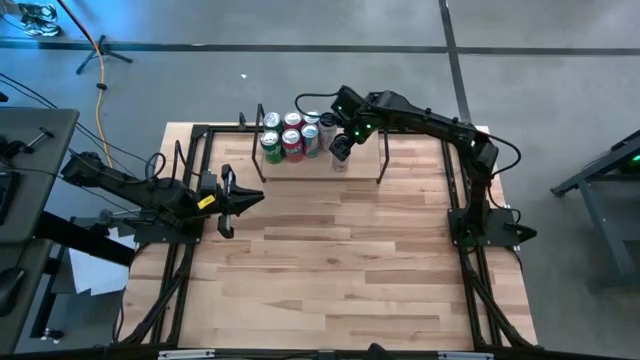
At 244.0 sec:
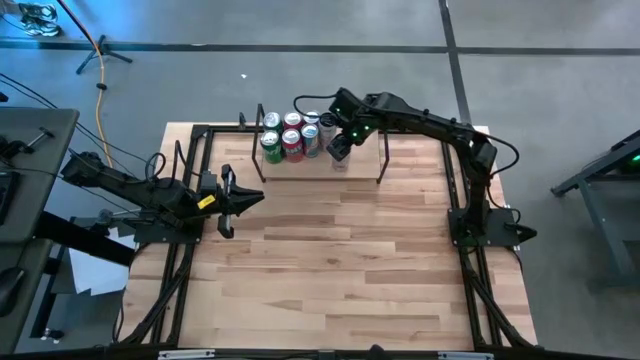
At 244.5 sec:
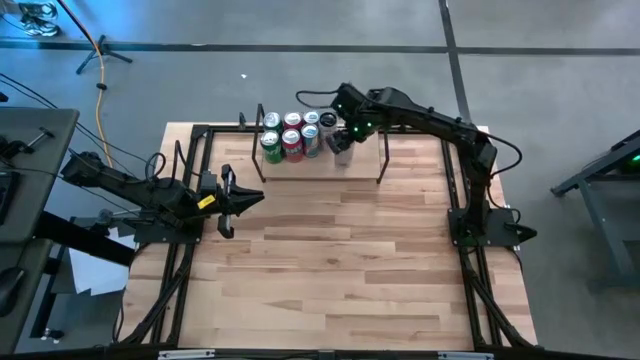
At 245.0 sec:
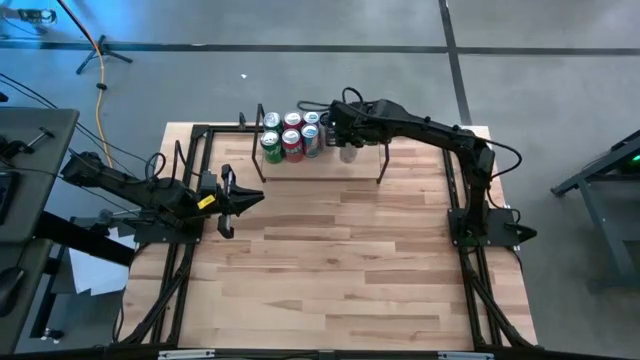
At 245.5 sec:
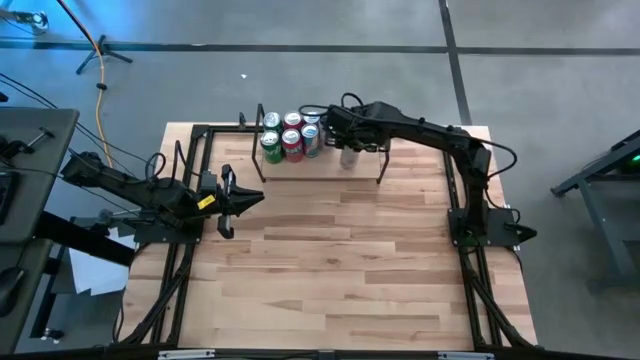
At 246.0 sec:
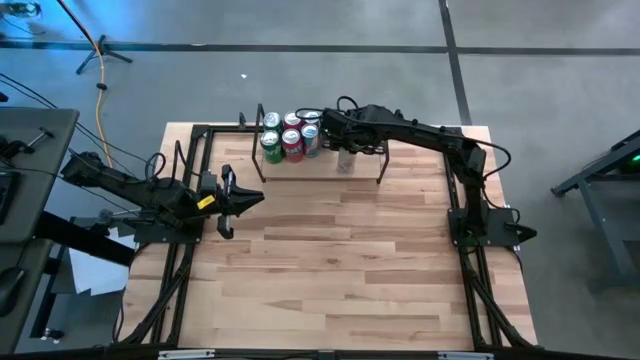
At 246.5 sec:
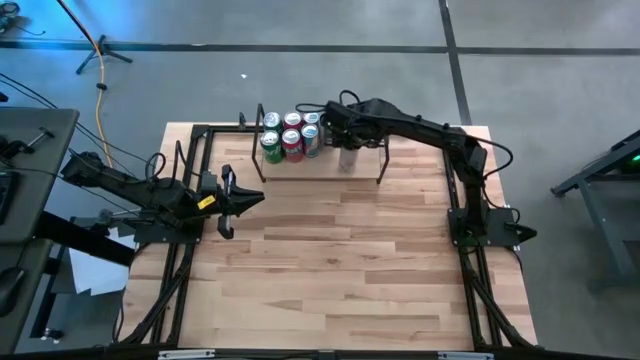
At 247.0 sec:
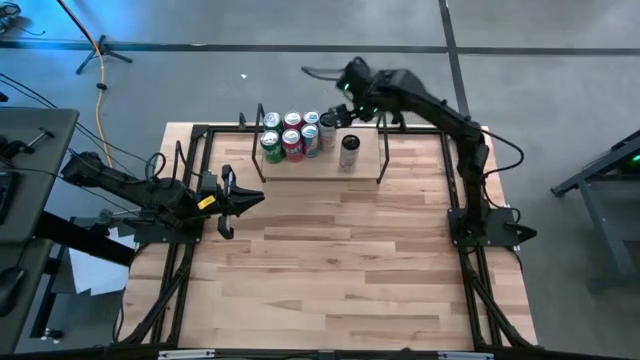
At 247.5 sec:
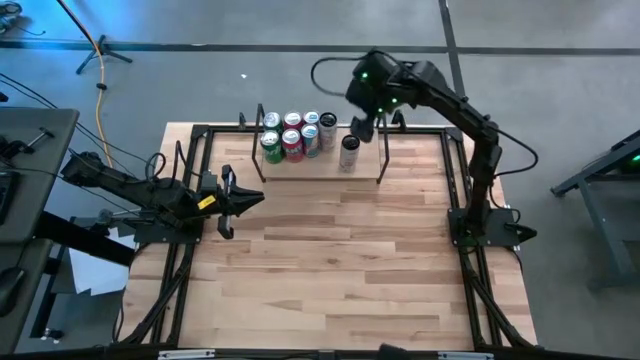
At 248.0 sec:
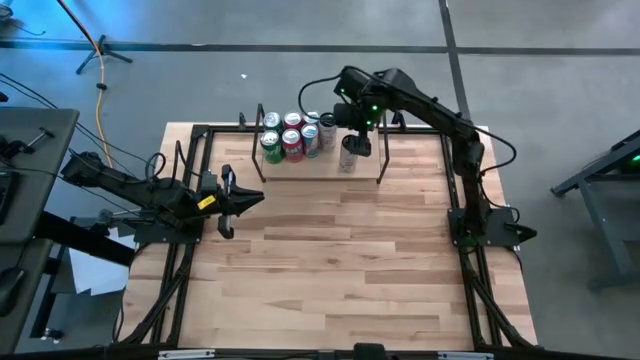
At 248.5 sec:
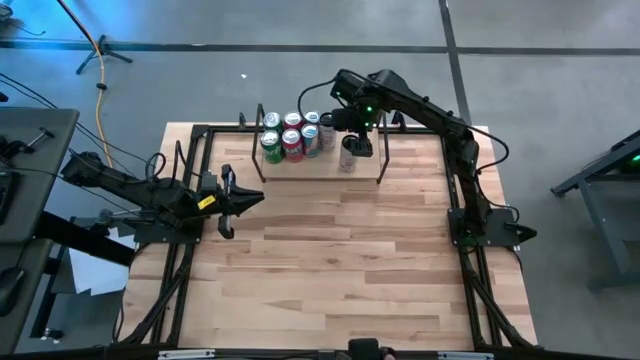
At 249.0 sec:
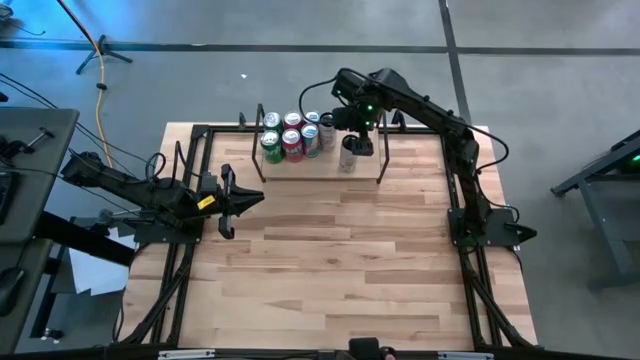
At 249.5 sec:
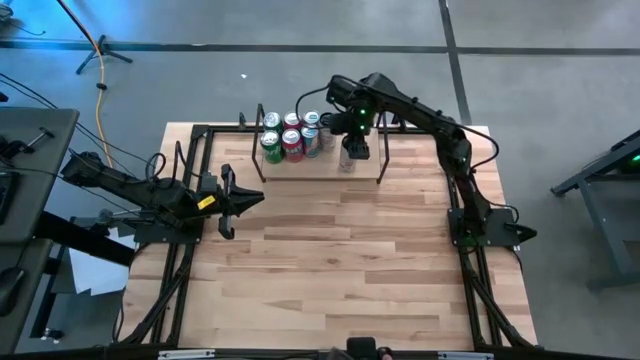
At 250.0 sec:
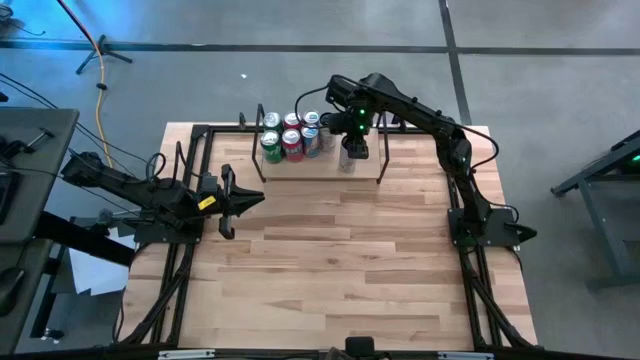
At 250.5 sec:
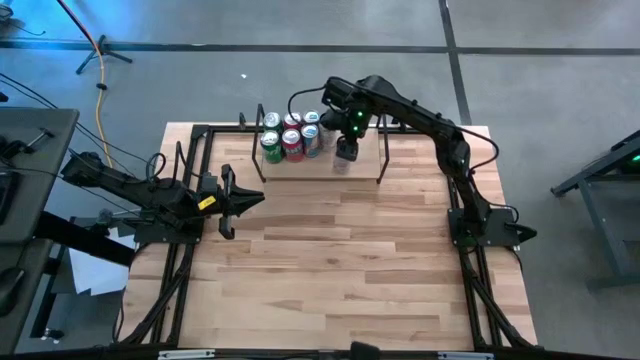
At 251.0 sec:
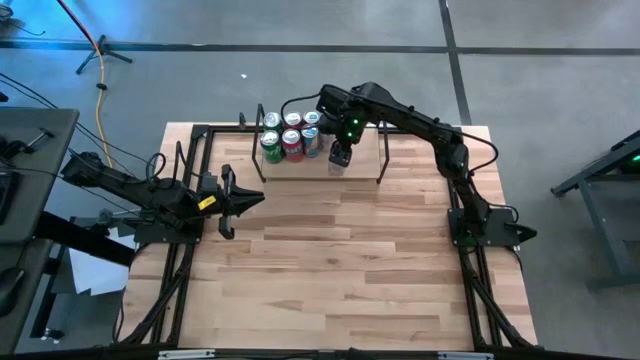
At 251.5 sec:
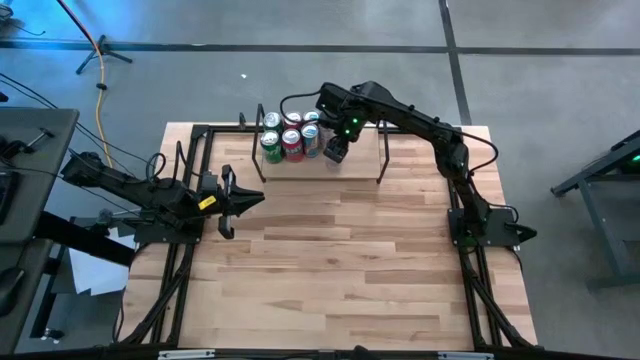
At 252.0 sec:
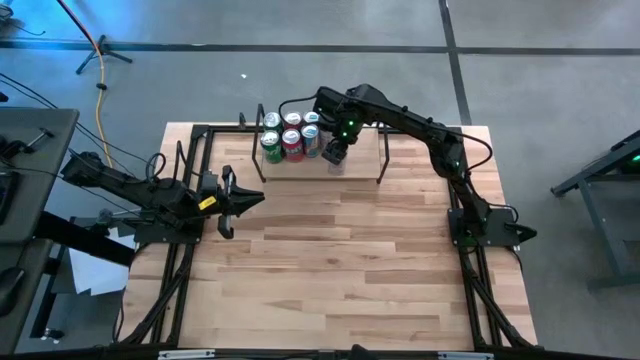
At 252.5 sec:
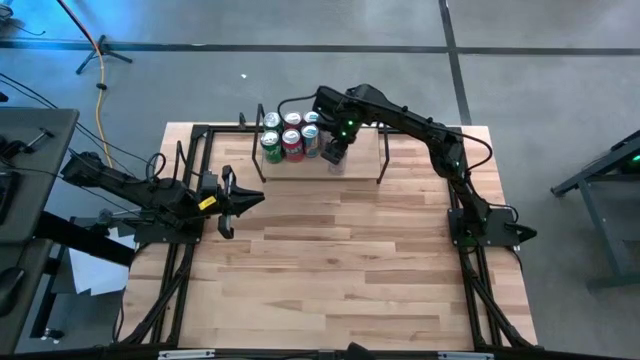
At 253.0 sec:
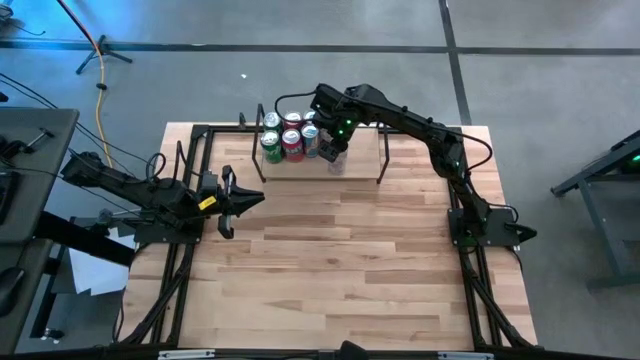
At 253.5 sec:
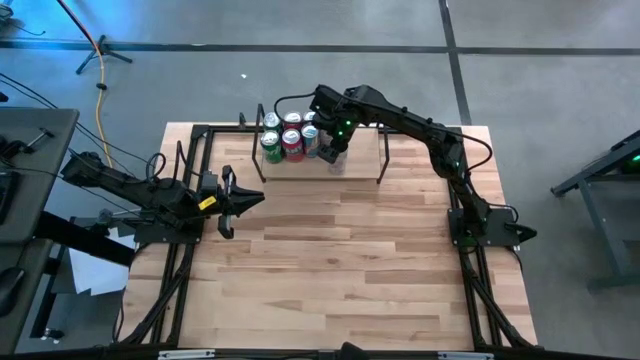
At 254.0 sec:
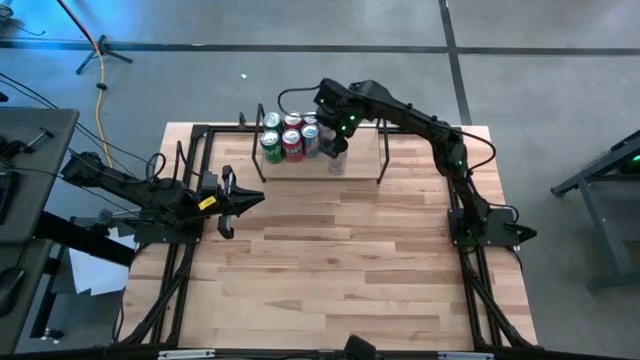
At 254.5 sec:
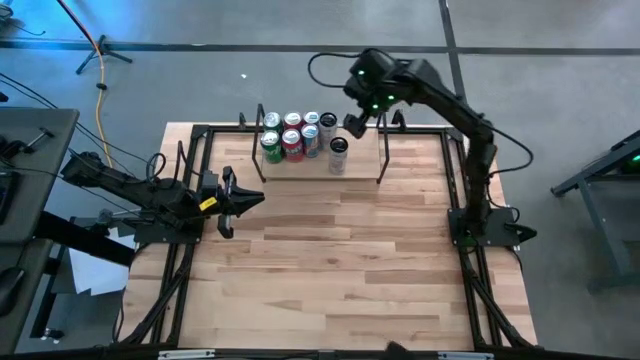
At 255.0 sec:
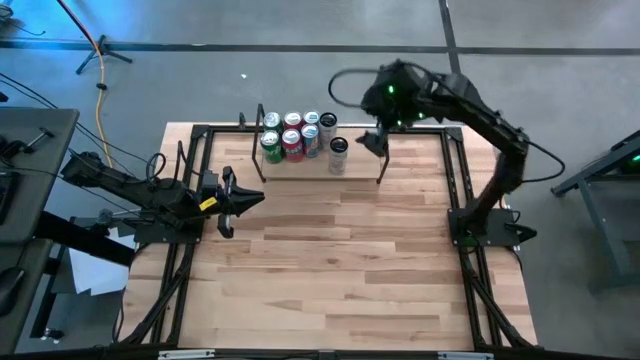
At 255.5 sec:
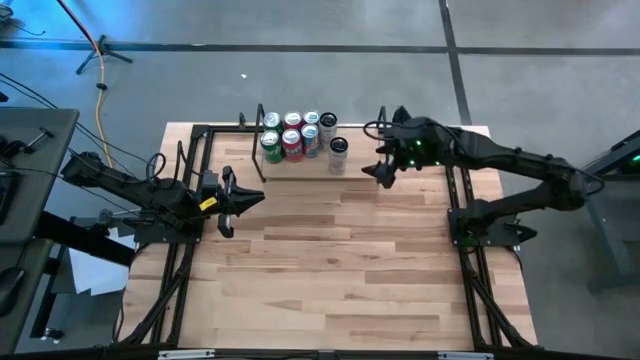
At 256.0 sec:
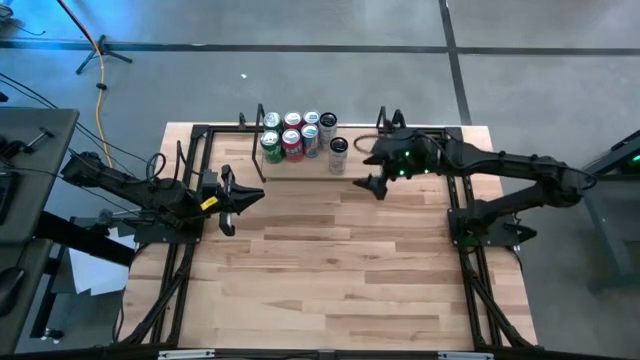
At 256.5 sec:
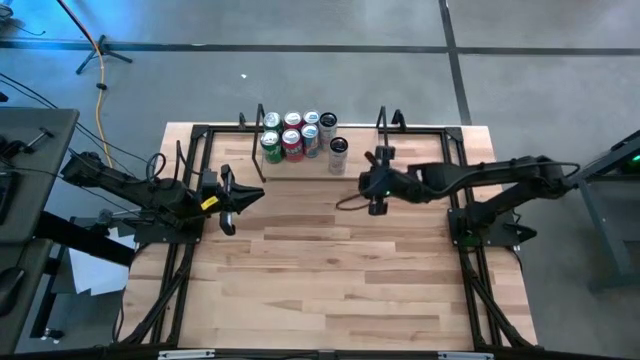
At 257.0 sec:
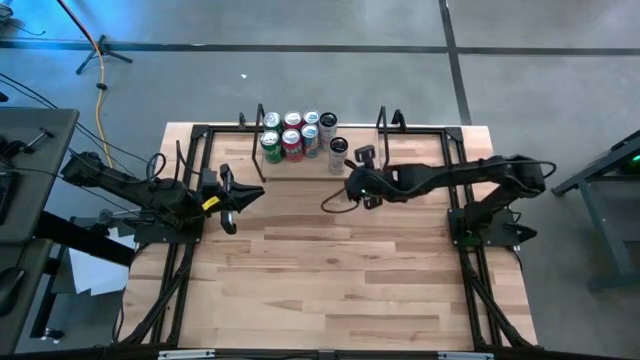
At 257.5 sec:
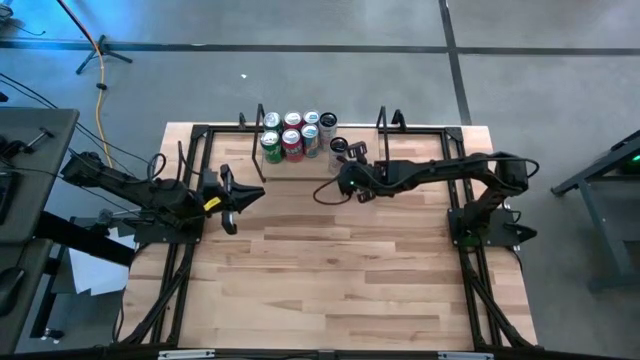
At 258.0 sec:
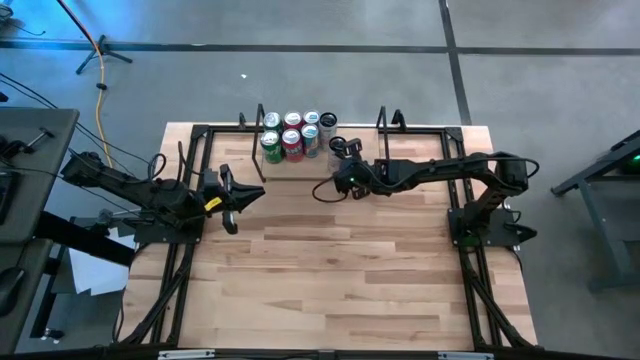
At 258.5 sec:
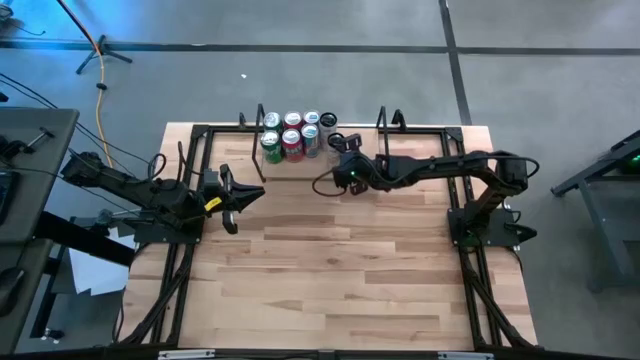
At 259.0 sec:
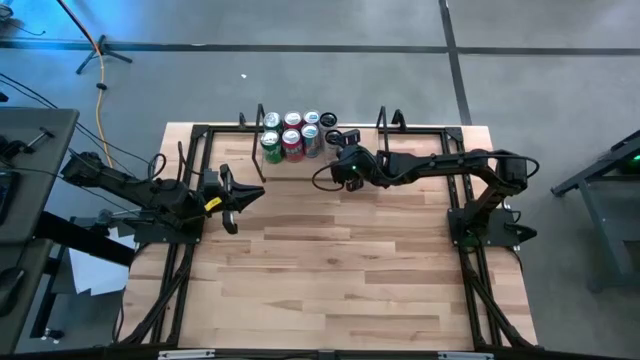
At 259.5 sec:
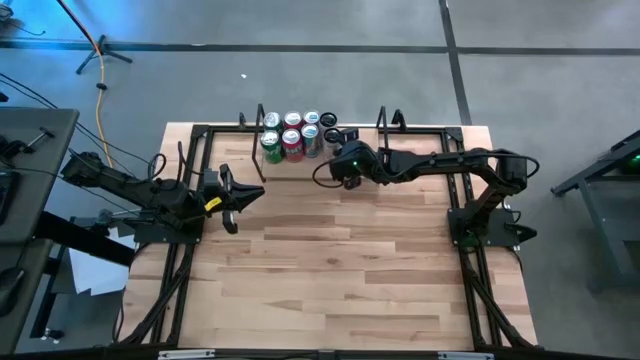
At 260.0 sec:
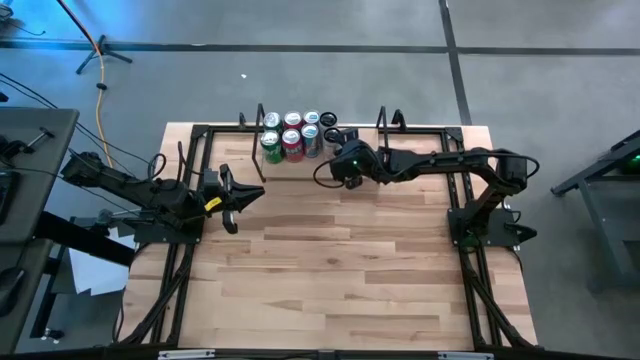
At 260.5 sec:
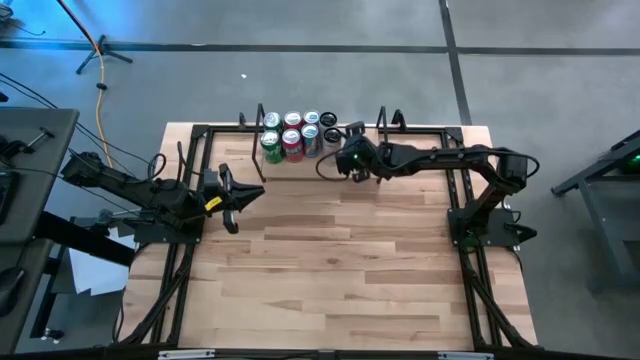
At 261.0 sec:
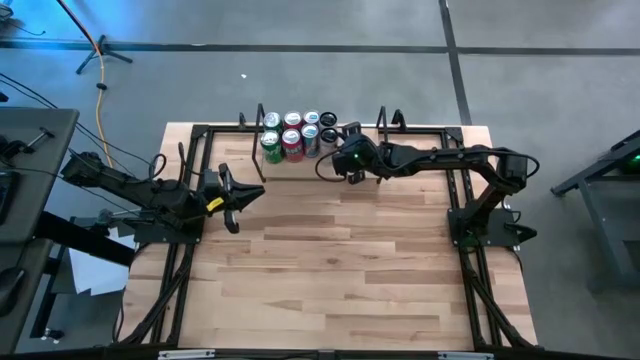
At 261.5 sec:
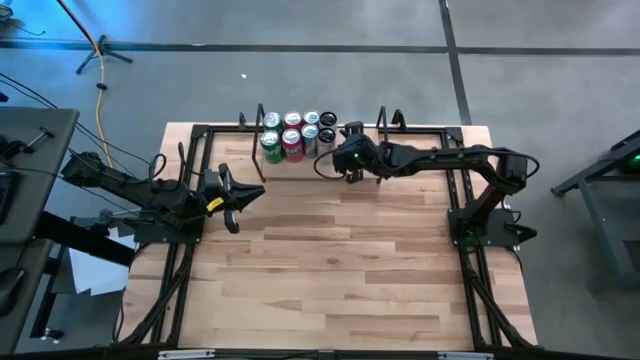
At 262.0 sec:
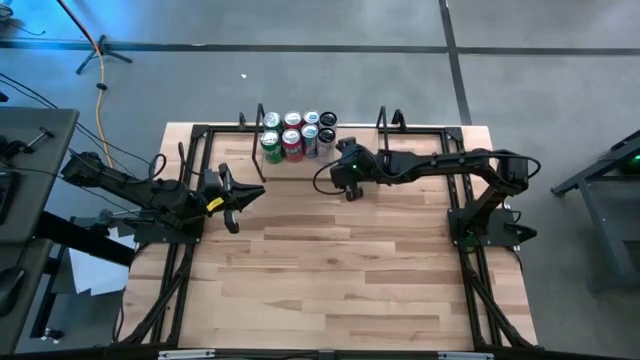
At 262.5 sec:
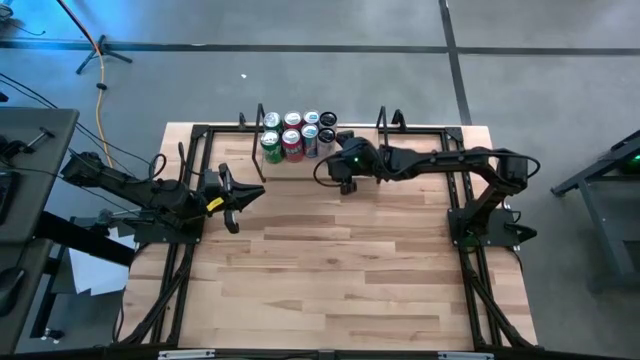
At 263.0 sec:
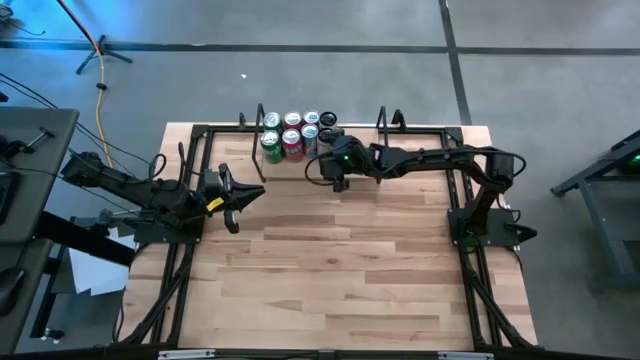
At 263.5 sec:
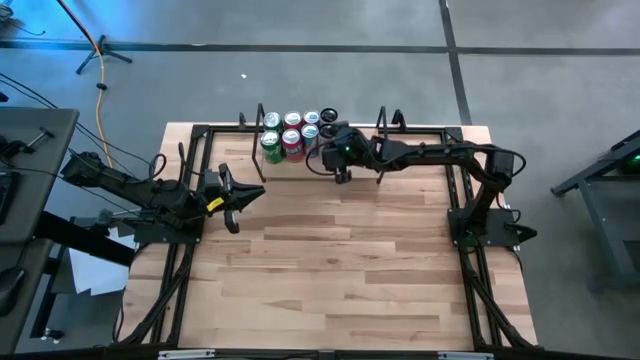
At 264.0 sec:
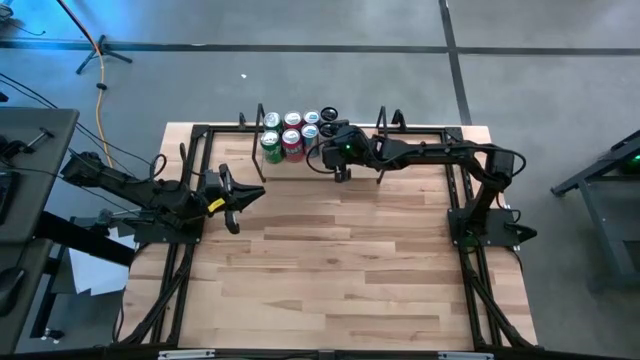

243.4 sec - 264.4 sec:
Task: Place canned beverage on shelf
Put the white pink soda can on the shelf aligned with the white pink soda can

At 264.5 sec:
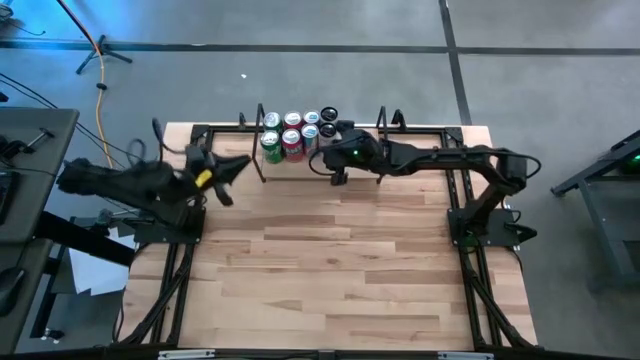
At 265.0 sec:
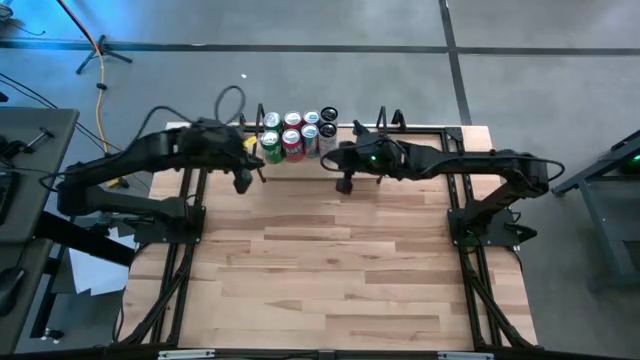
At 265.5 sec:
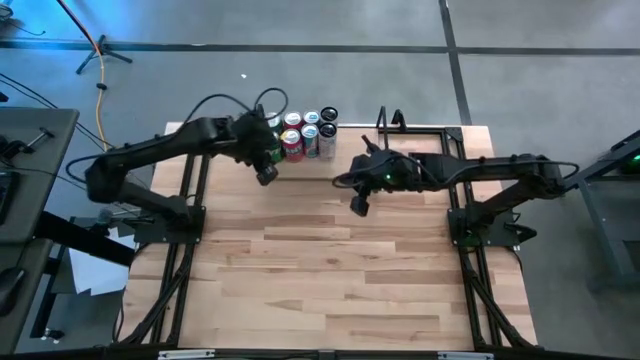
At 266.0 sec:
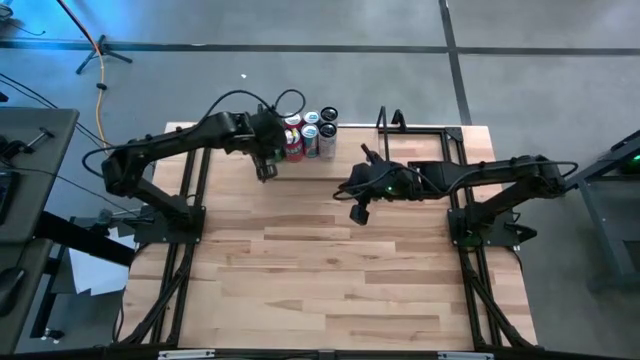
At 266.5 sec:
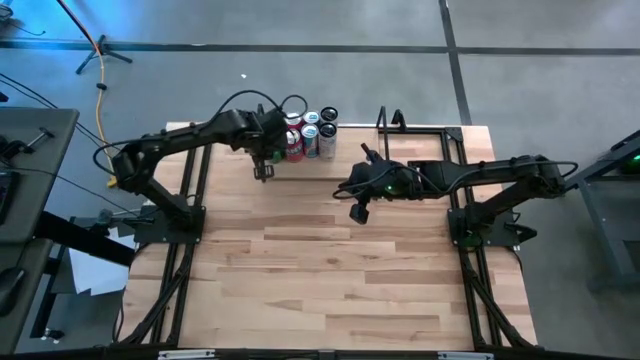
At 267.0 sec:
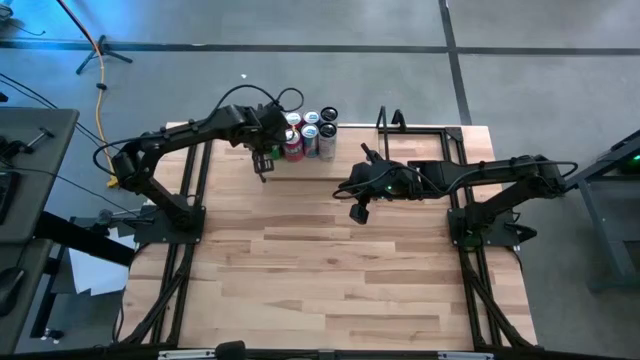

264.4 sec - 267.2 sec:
Adjust the green soda cans on the shelf
